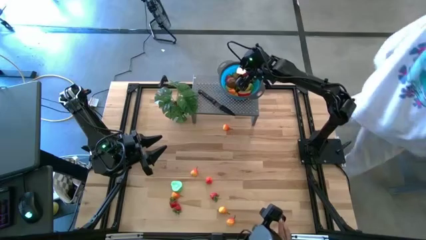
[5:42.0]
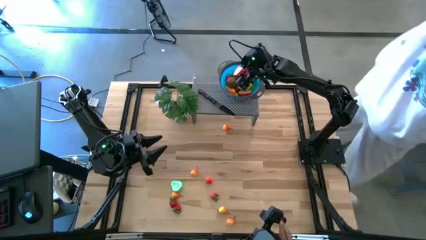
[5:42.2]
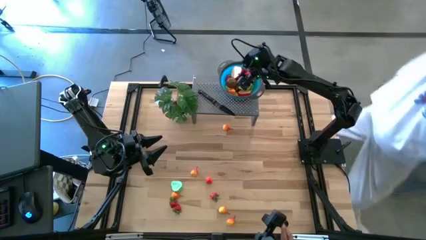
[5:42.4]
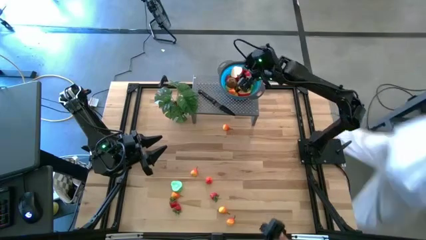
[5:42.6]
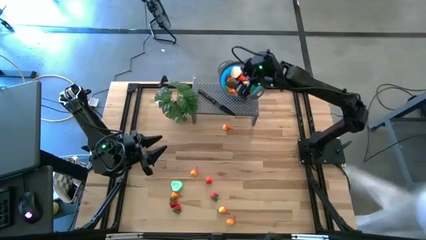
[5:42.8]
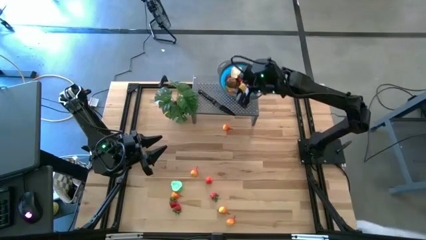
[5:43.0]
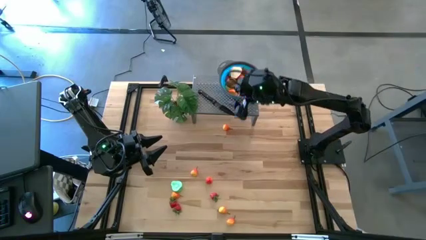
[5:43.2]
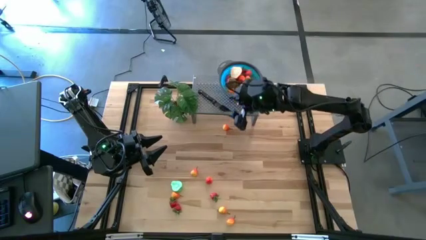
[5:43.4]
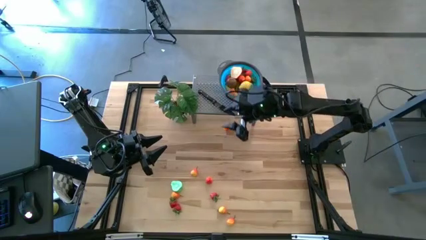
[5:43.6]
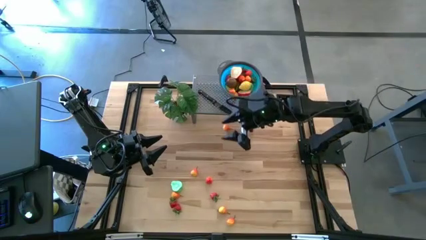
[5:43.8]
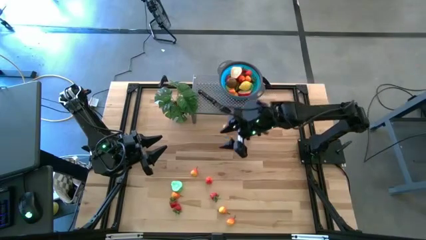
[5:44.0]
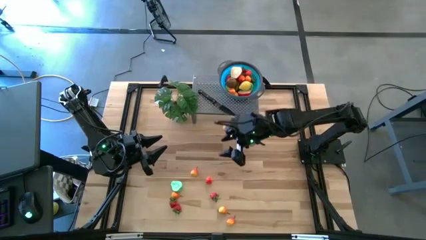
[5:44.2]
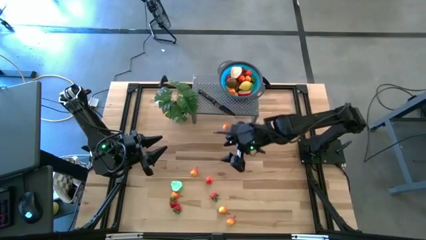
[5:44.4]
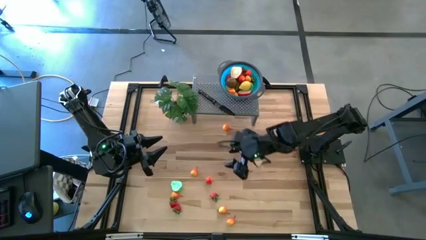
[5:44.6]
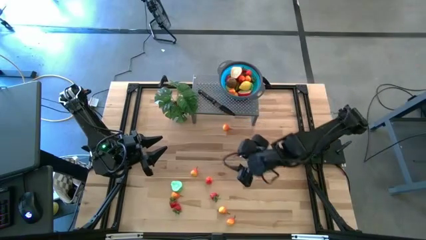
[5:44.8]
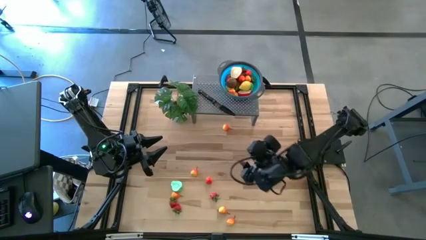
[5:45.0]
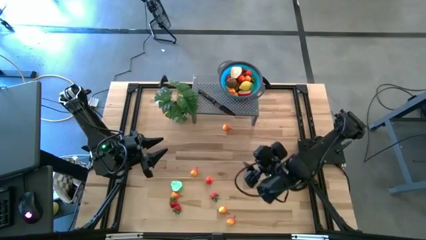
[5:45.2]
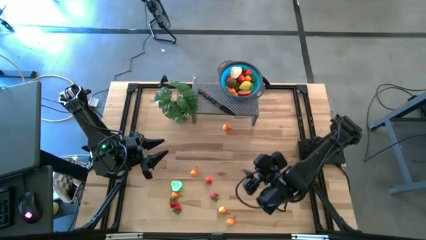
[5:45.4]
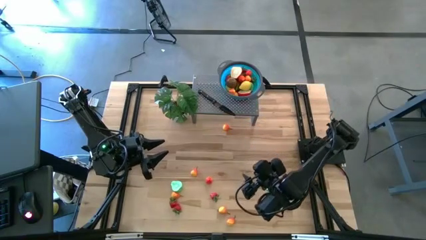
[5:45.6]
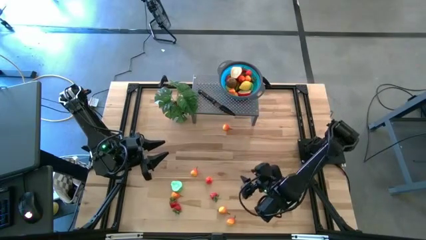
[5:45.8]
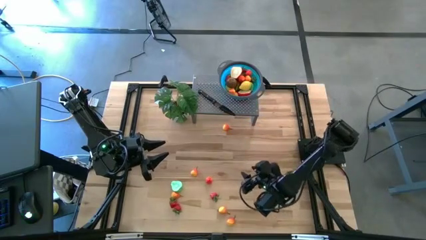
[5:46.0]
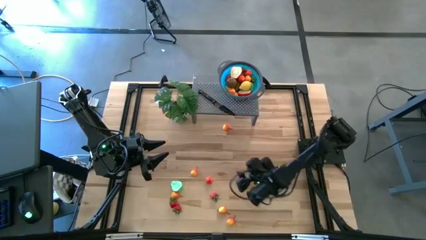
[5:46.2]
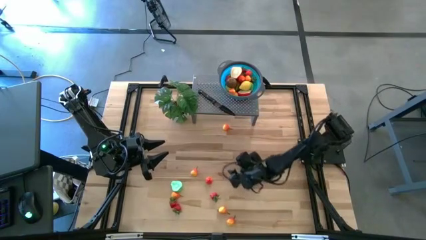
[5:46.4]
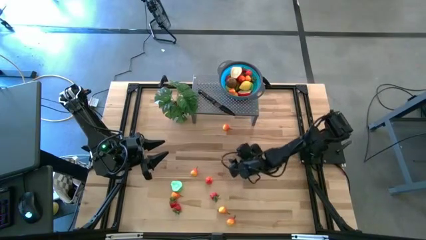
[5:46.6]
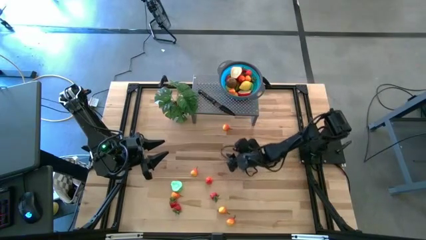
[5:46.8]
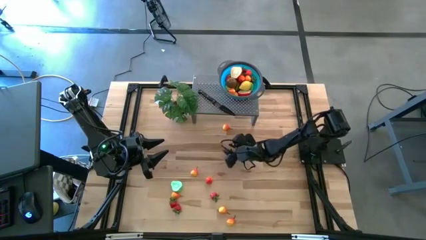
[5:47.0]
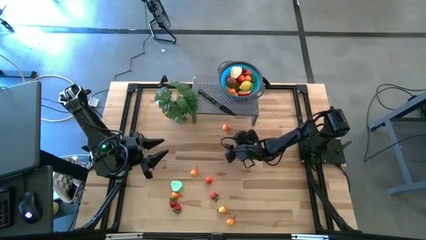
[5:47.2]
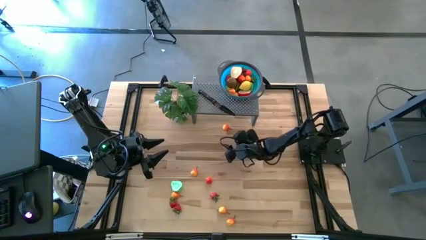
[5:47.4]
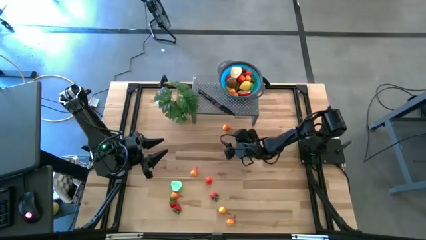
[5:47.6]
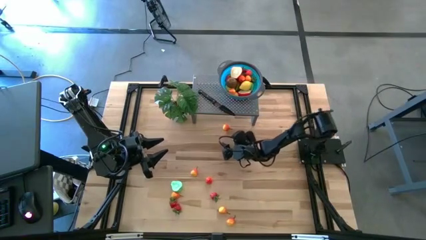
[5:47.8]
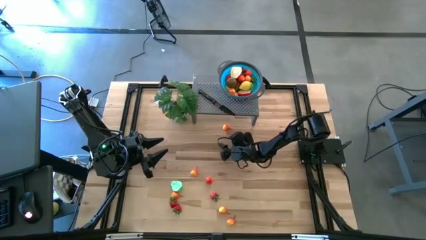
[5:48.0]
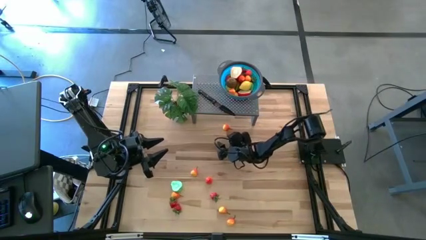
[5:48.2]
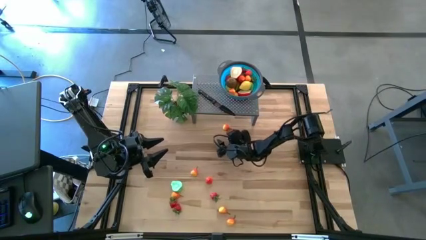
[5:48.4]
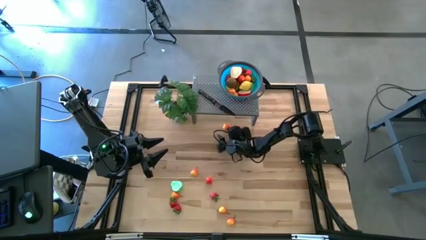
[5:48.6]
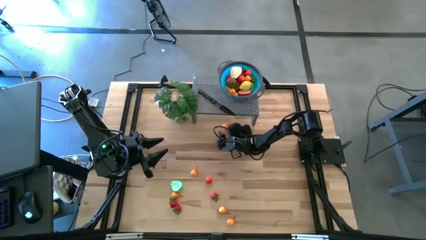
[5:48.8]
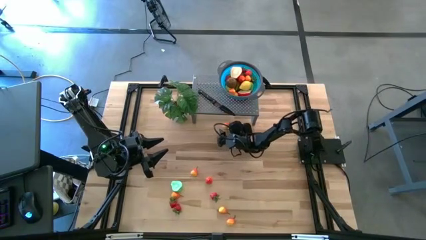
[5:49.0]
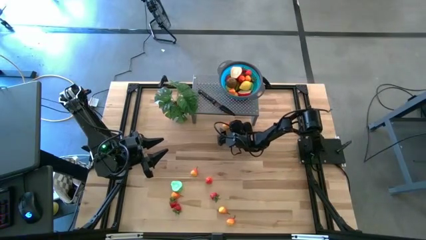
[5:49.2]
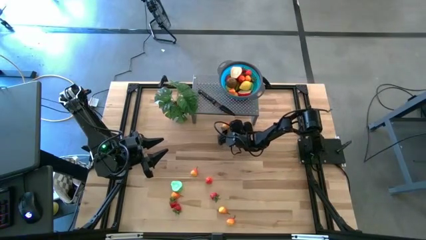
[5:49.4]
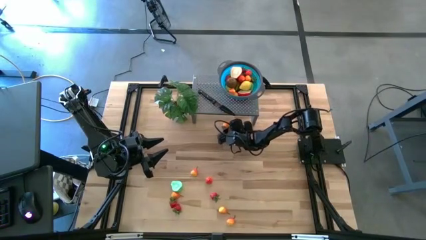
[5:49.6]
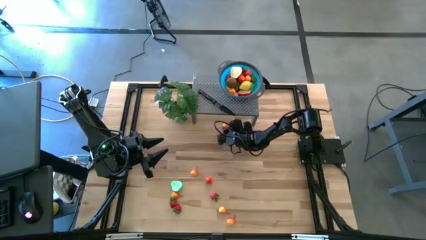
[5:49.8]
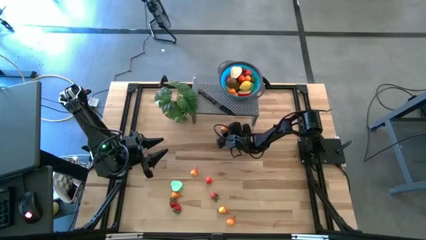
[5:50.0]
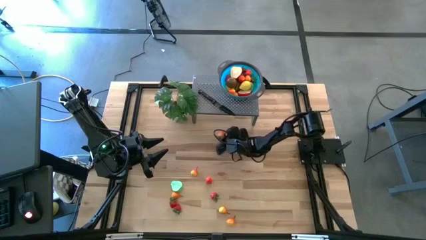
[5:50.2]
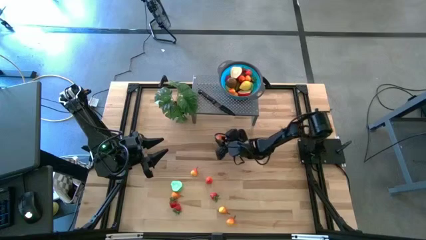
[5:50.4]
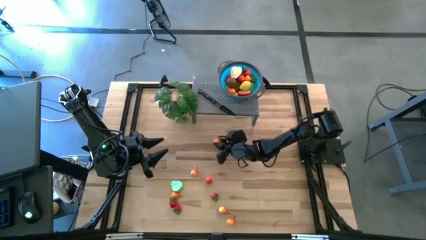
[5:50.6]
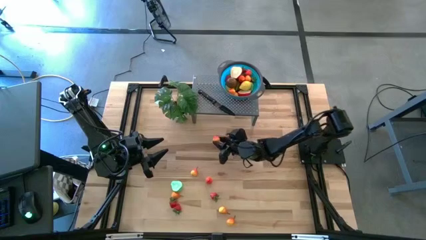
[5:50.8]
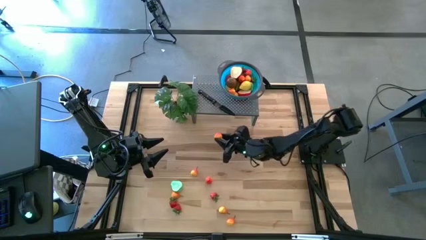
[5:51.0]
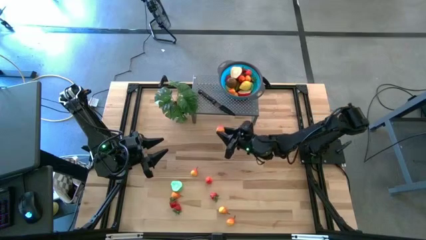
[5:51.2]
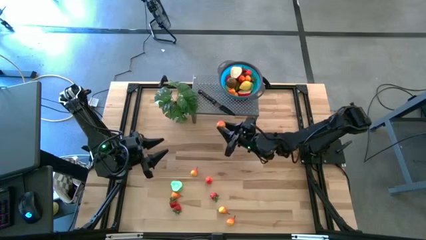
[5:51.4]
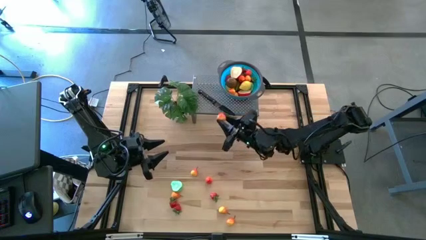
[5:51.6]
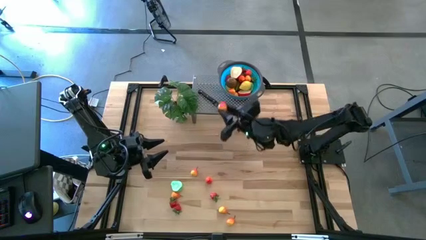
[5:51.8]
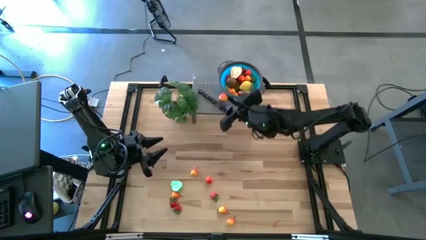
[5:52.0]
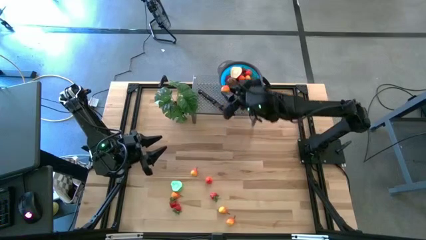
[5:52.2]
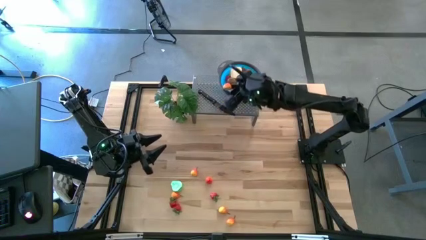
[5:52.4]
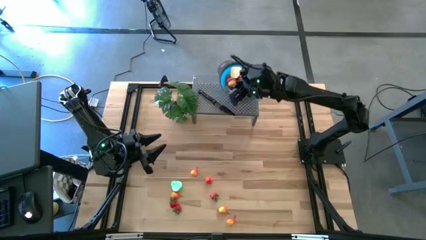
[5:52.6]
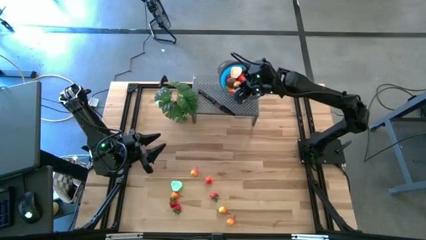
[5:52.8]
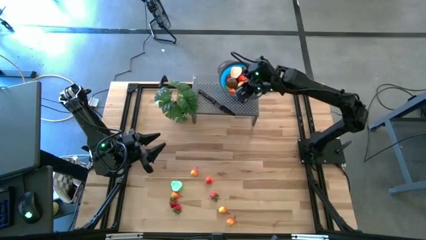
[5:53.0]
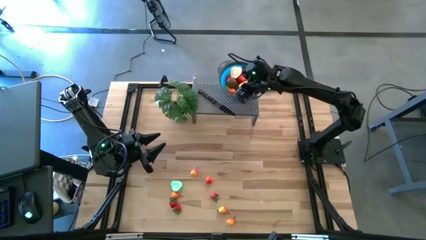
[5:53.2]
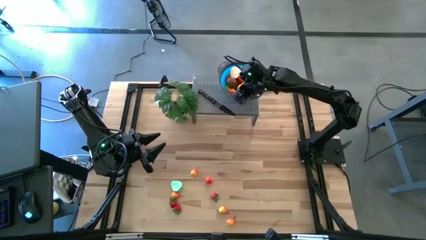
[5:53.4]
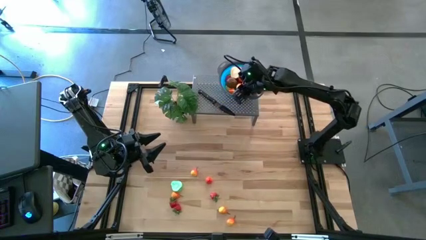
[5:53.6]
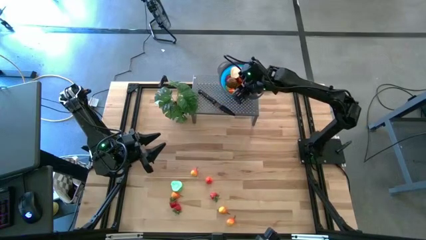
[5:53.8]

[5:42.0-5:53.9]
Task: Pick & Place Fruit
Put the yellow pear in the blue bowl on the shelf

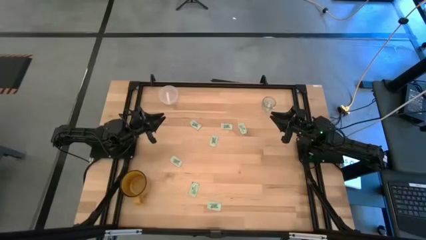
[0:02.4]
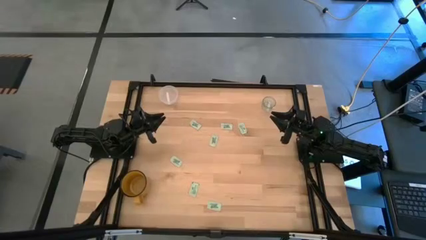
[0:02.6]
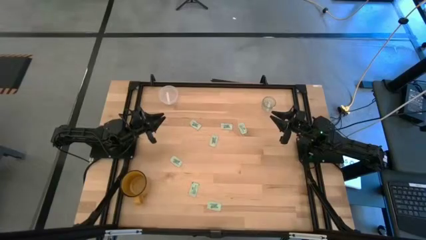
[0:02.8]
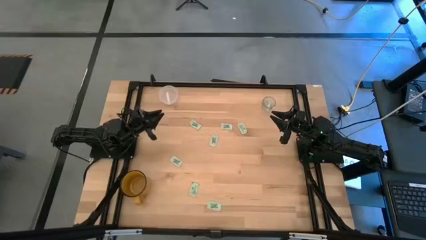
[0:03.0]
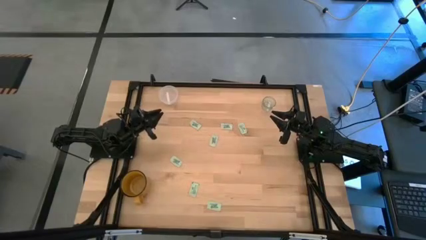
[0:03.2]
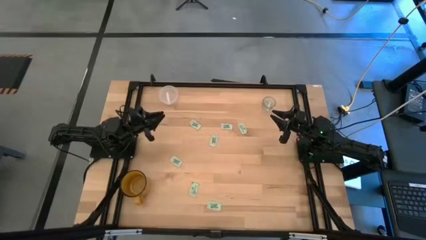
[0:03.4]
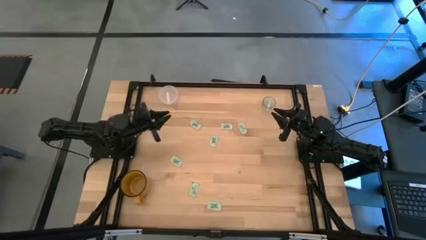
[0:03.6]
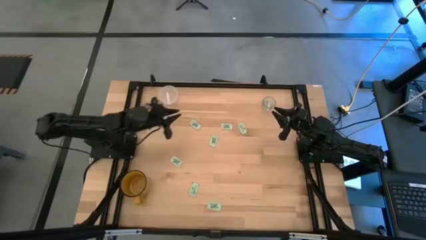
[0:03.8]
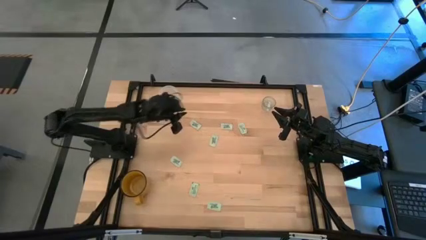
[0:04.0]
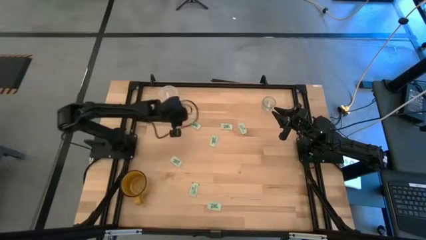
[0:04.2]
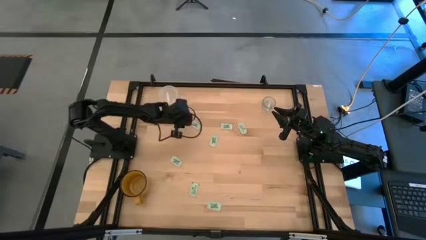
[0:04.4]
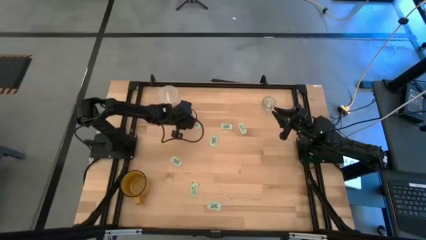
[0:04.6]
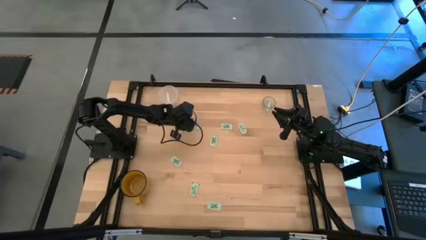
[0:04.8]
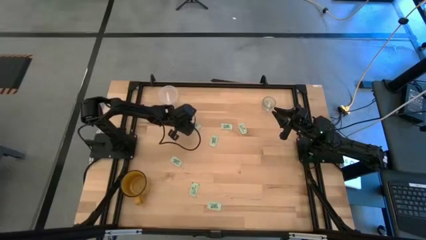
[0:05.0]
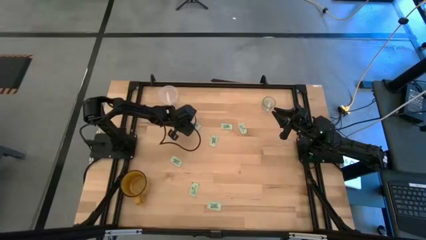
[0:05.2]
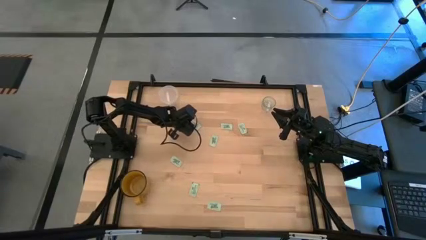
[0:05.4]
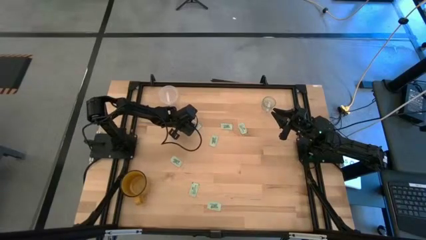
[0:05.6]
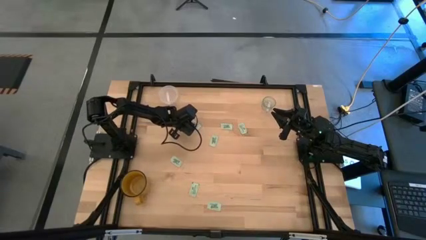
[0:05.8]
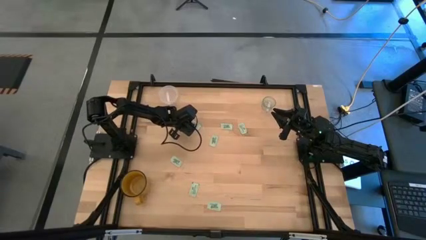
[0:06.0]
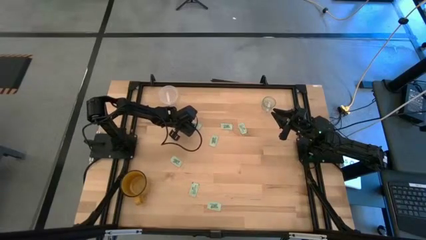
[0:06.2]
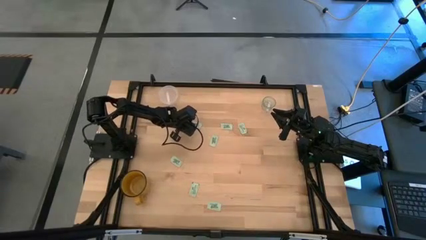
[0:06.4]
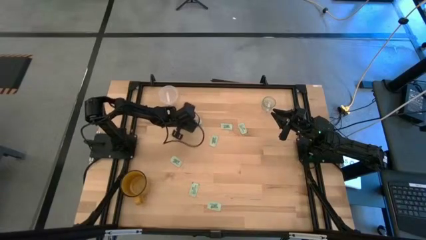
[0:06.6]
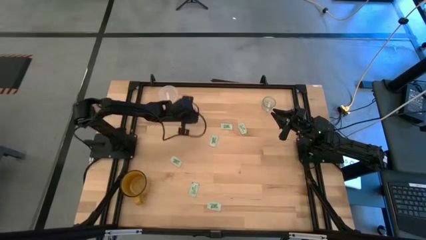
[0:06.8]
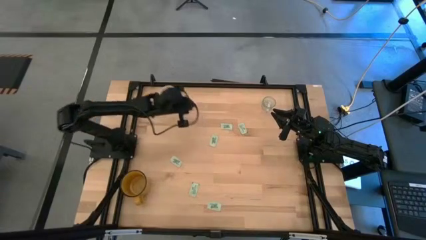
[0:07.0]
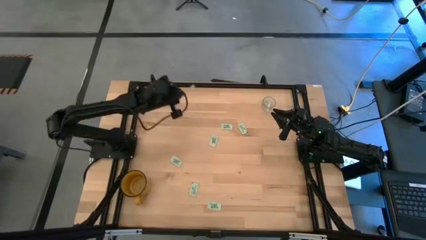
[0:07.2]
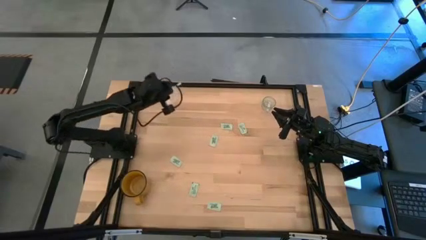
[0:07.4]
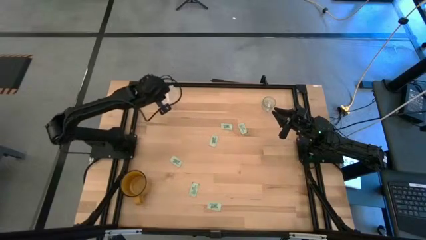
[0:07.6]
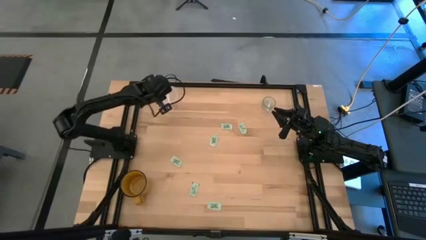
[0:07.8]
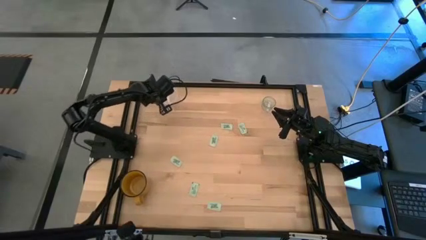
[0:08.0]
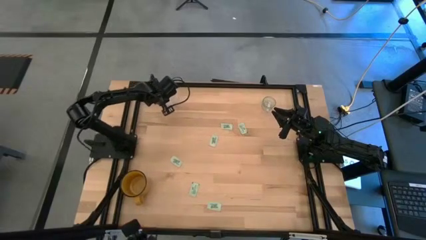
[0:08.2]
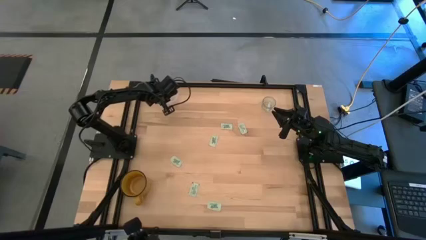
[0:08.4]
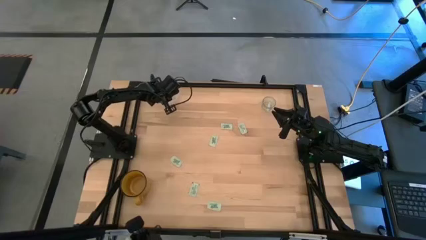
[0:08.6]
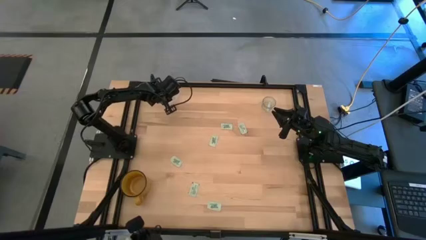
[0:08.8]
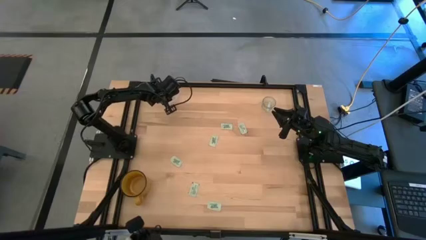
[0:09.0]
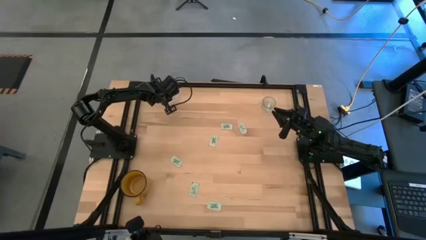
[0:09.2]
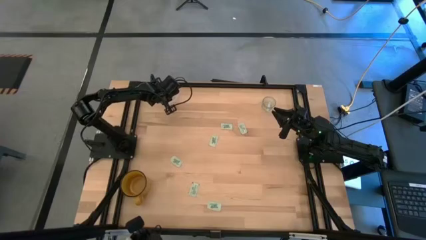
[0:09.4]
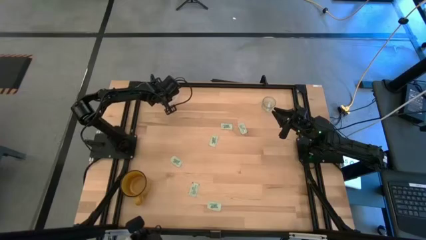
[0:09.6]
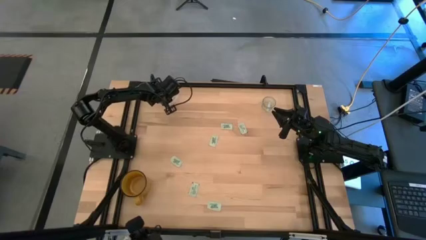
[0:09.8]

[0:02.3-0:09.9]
Task: Pick and place Stevia / Truvia into bins
Put the green stevia packet into the transparent container
